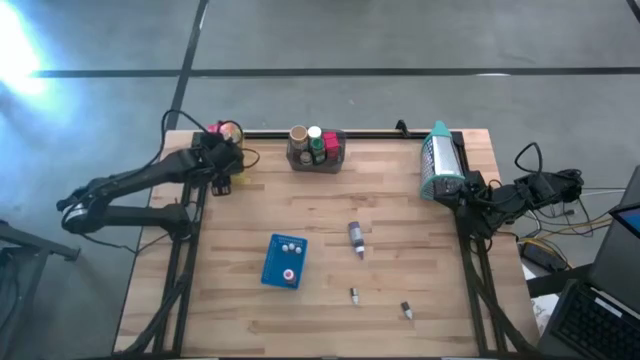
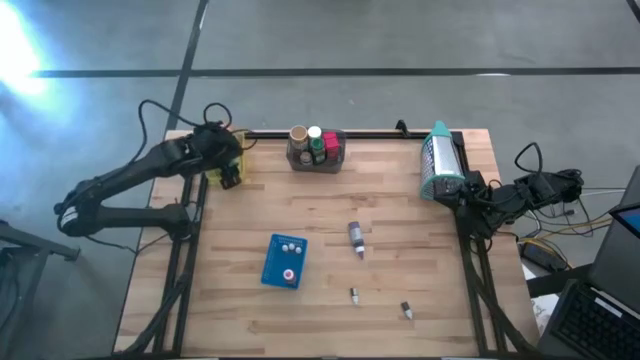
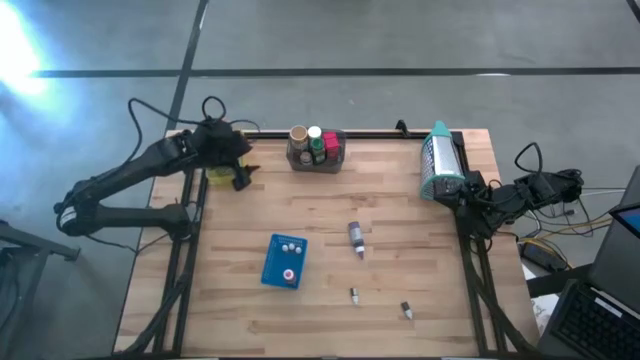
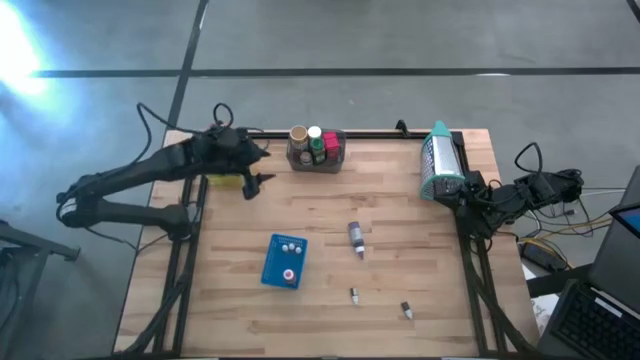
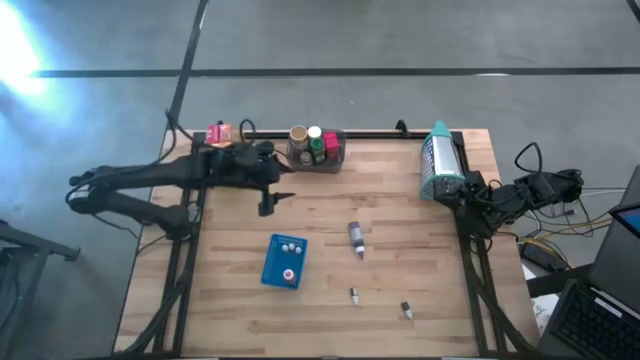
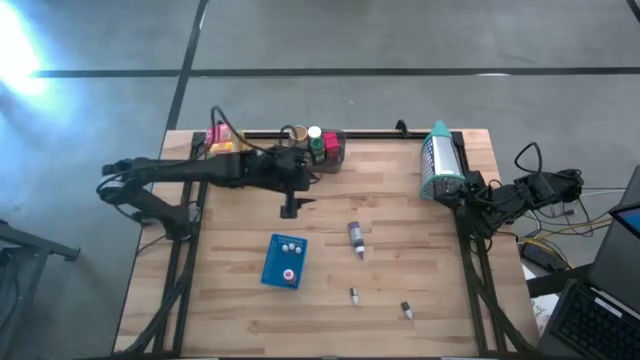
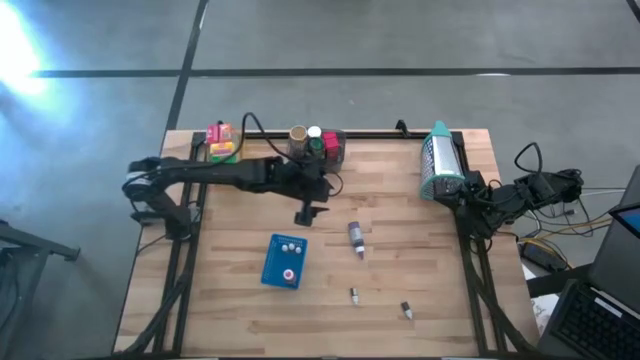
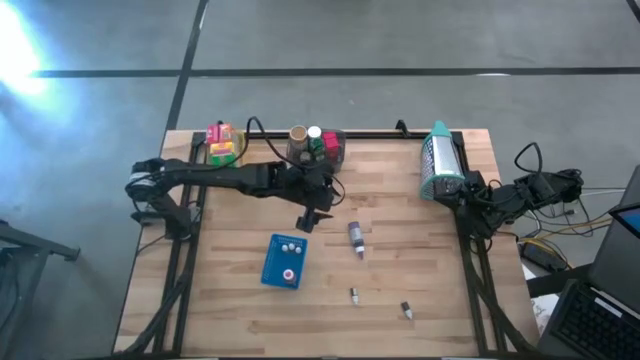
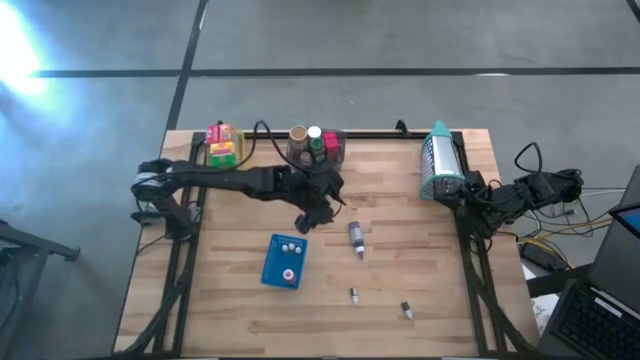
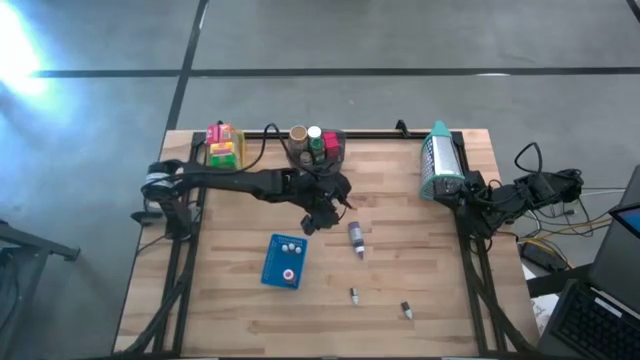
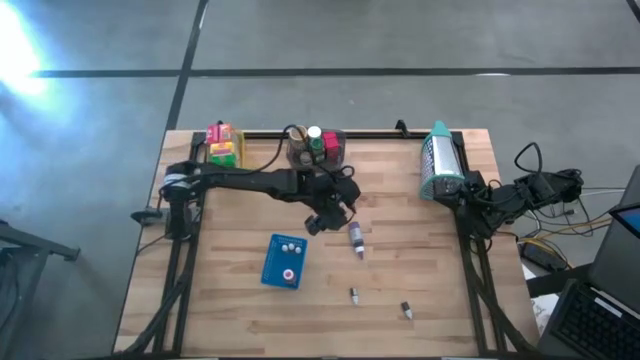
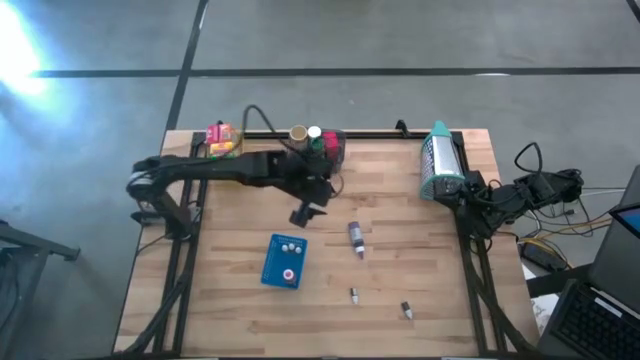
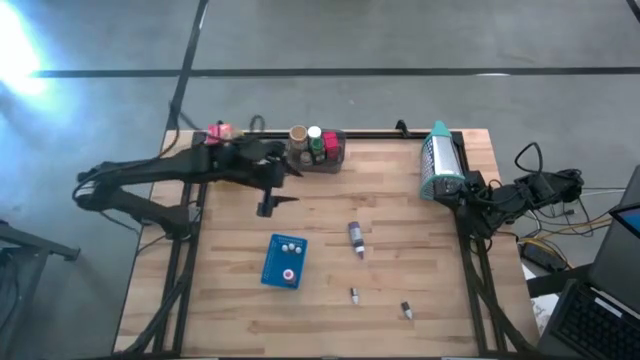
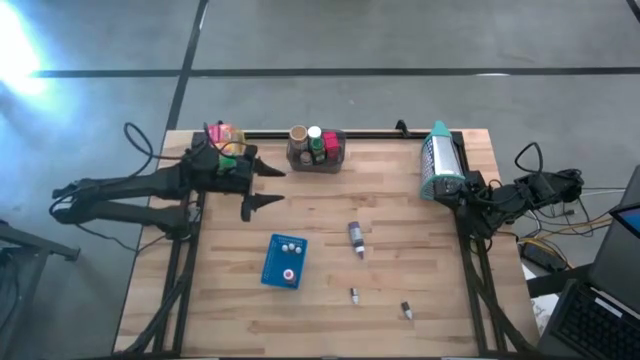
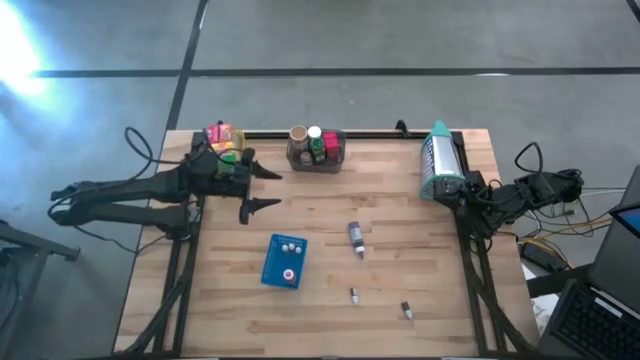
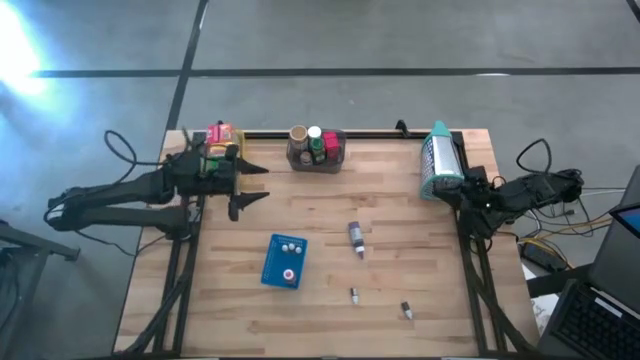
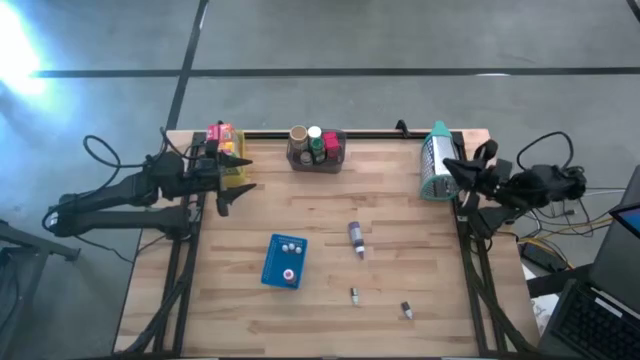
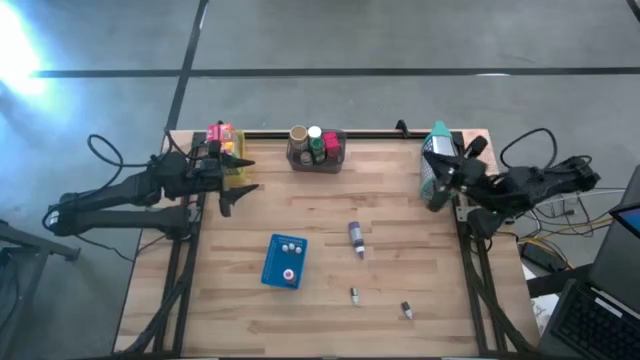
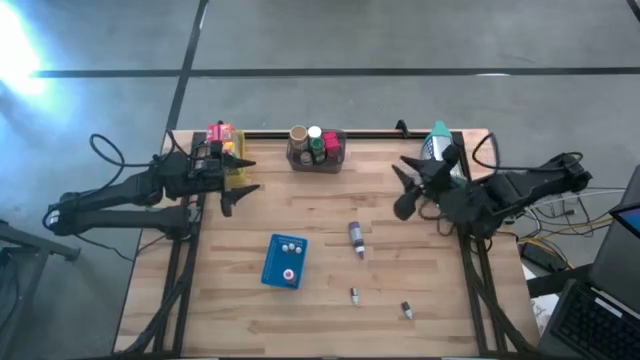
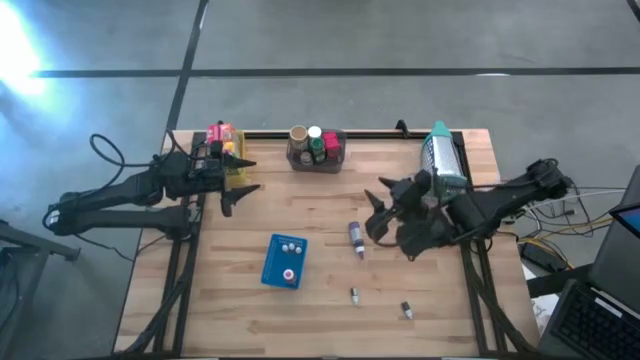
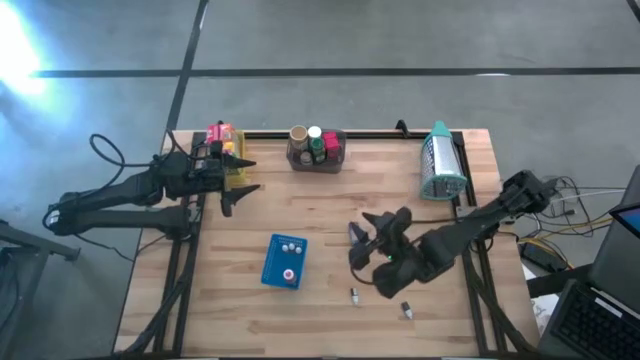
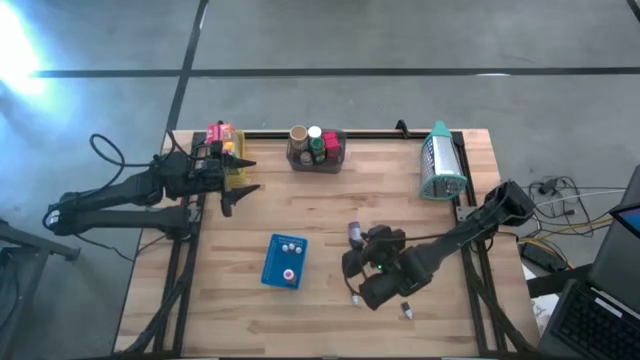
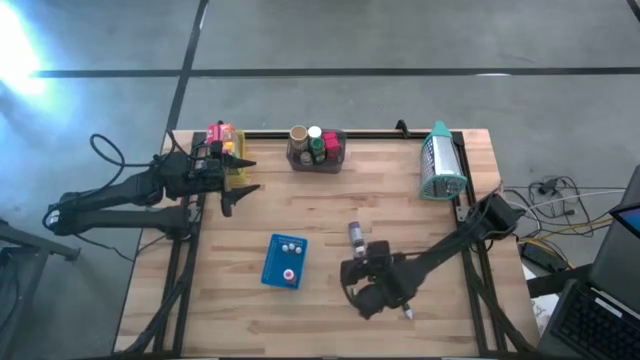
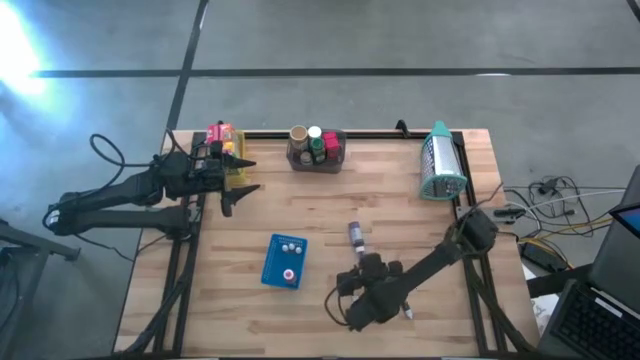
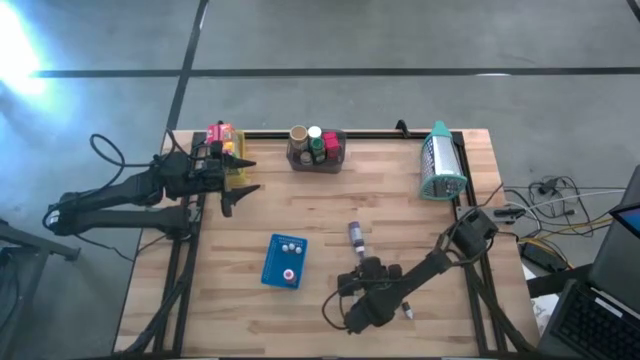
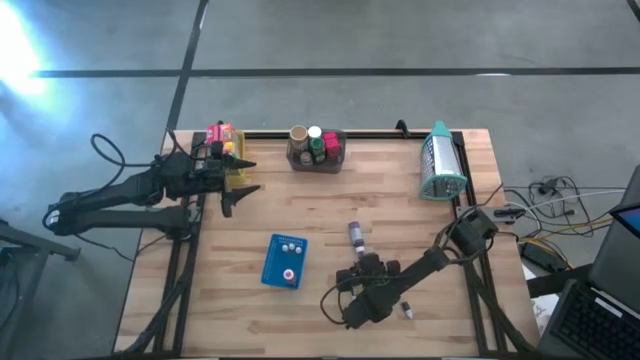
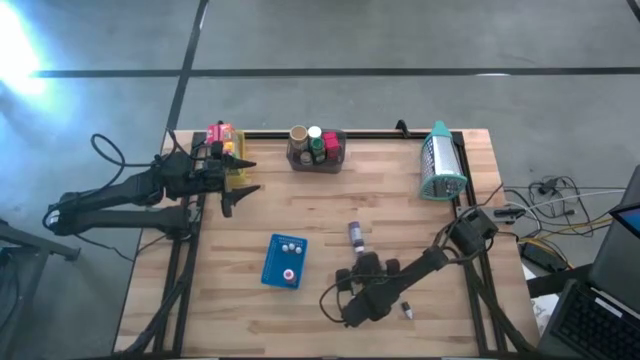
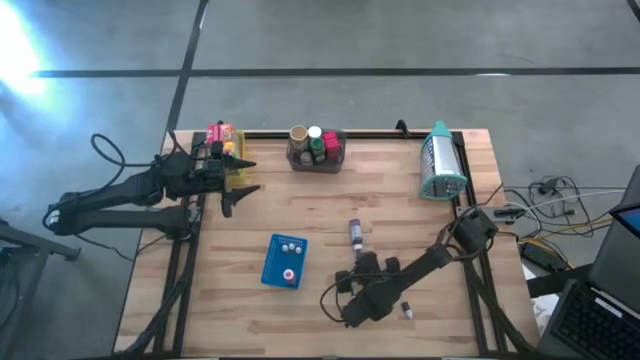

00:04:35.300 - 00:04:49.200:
Task: Pick & Place Kitchen Items
Put the large purple food coloring bottle into the blue bin

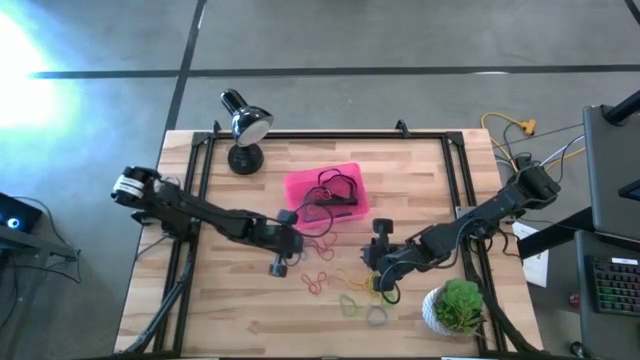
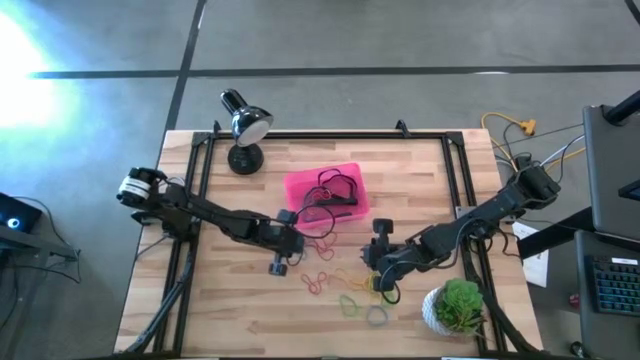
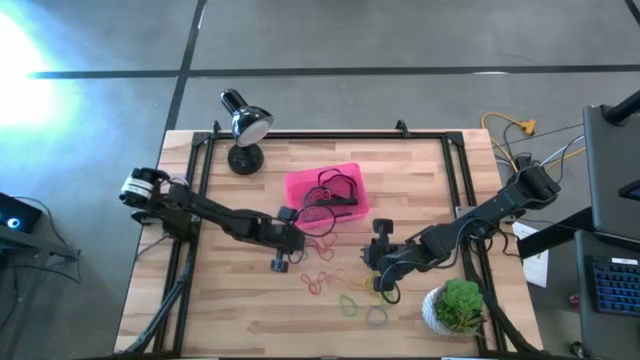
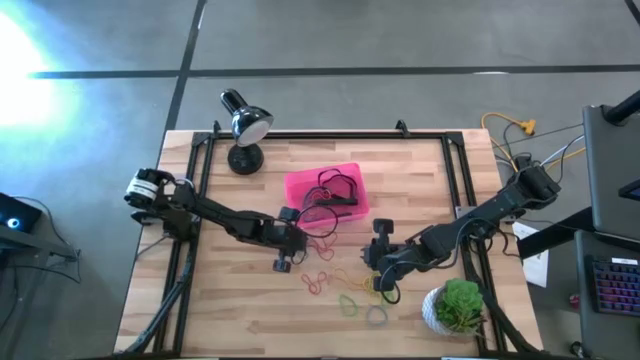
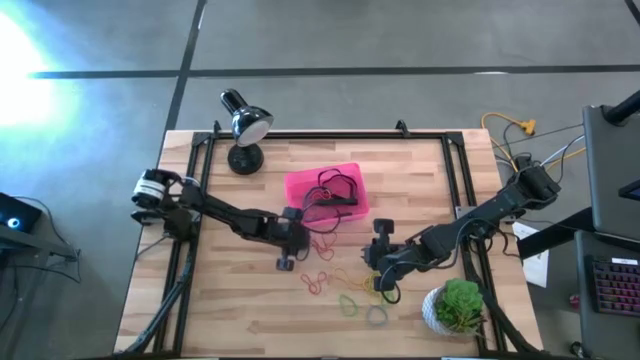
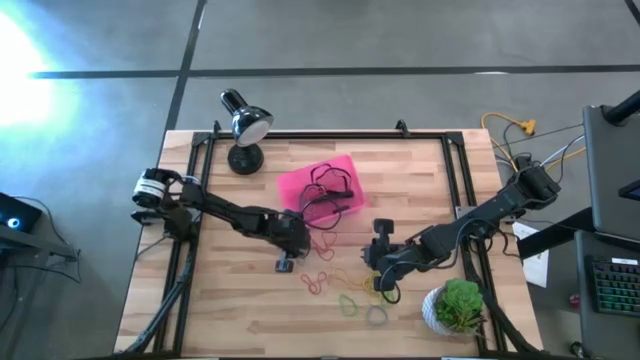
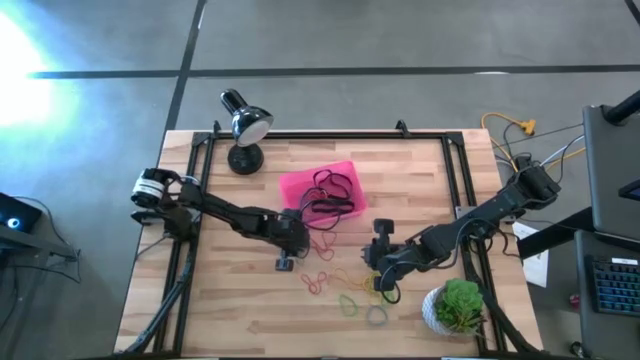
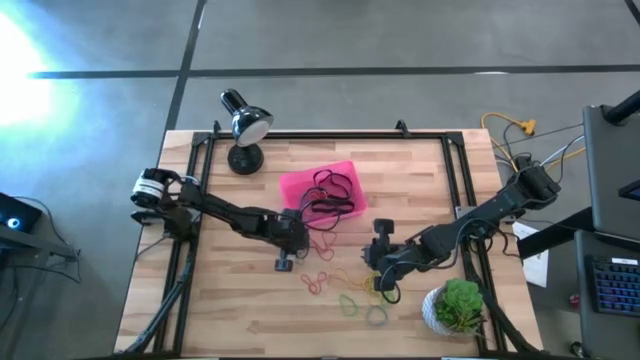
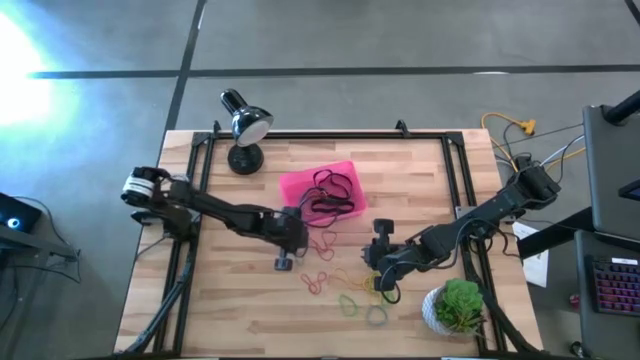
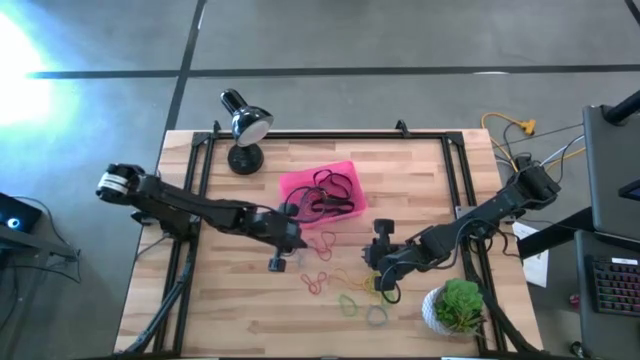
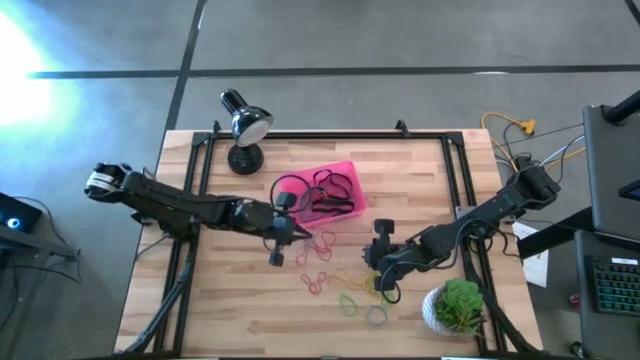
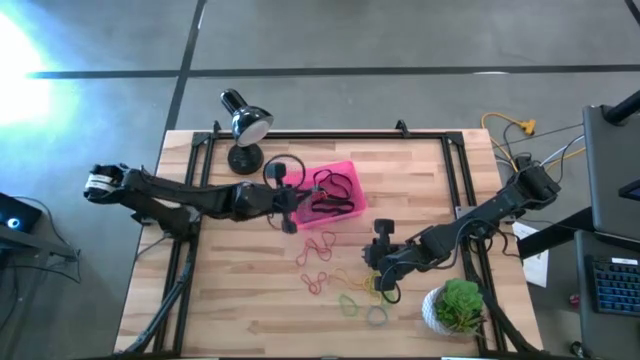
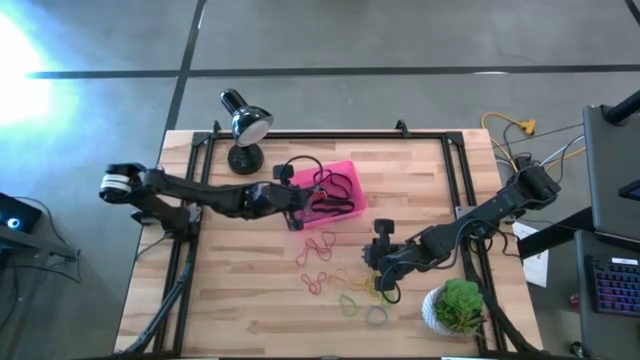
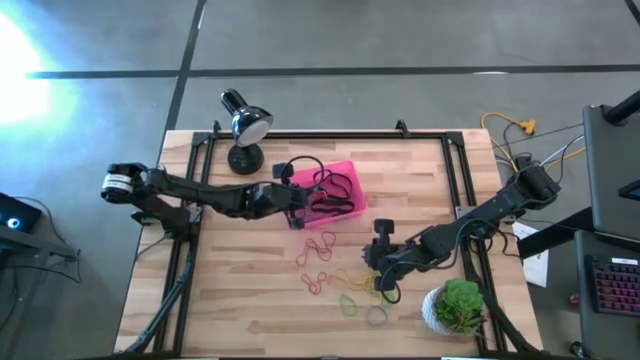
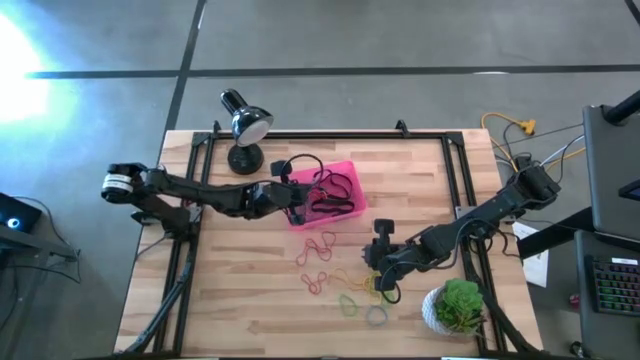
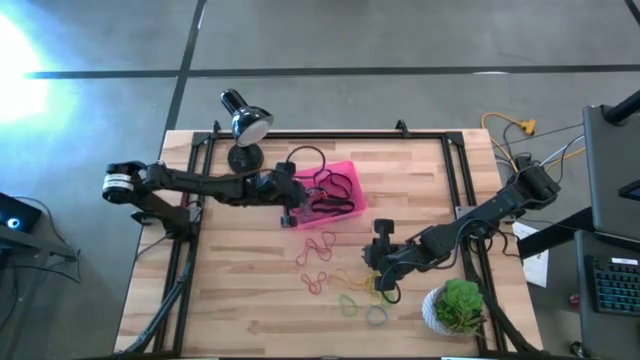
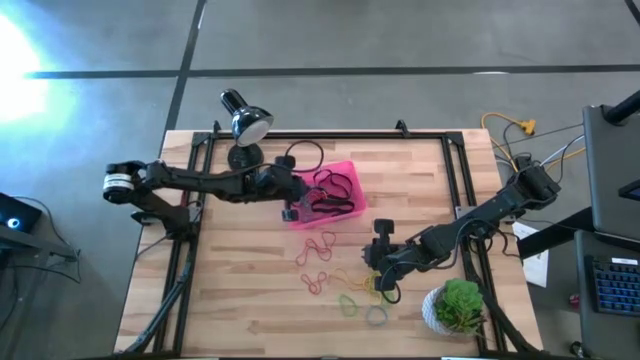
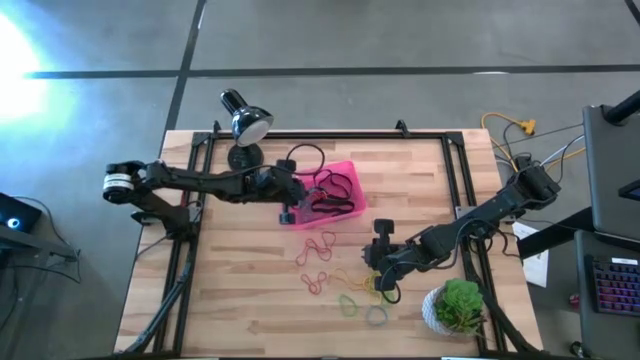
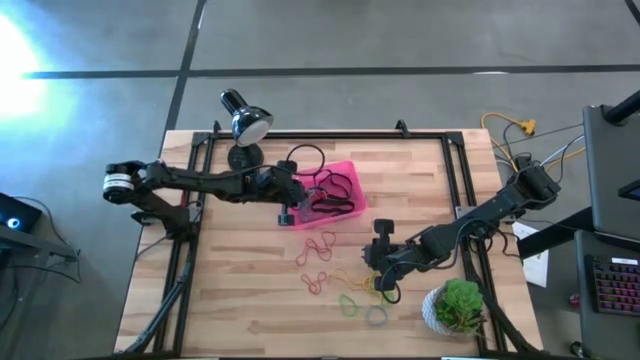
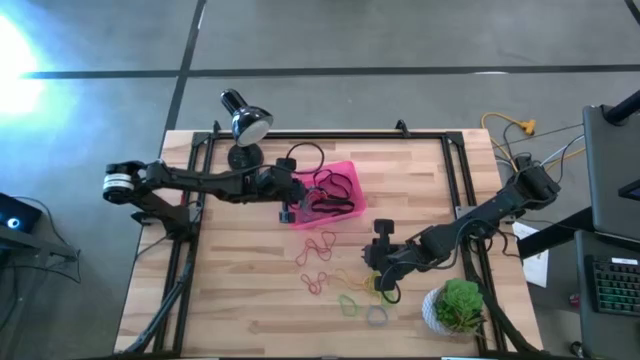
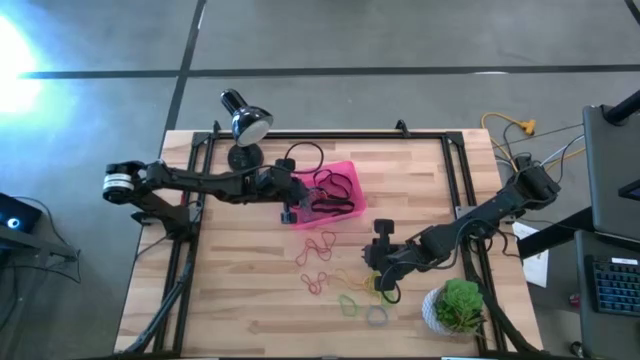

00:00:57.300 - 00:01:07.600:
Task: Pick and place rubber bands into bin
Put the blue rubber band into the red bin
